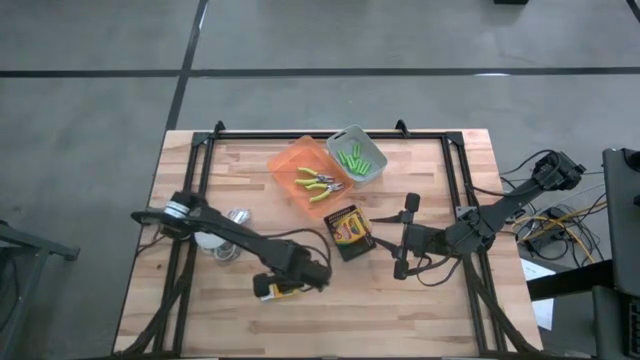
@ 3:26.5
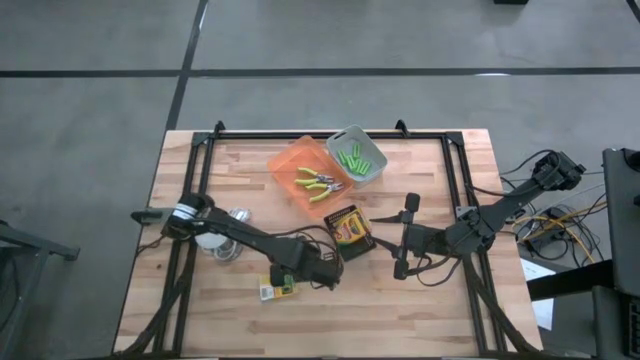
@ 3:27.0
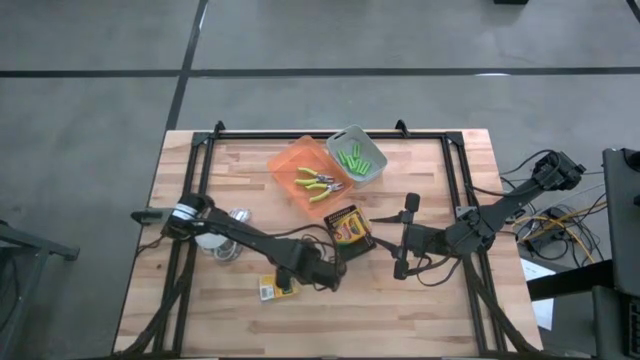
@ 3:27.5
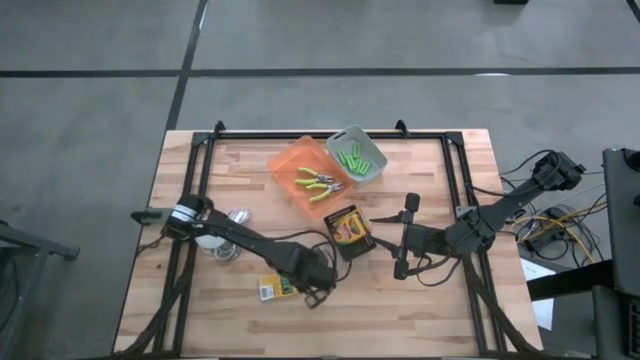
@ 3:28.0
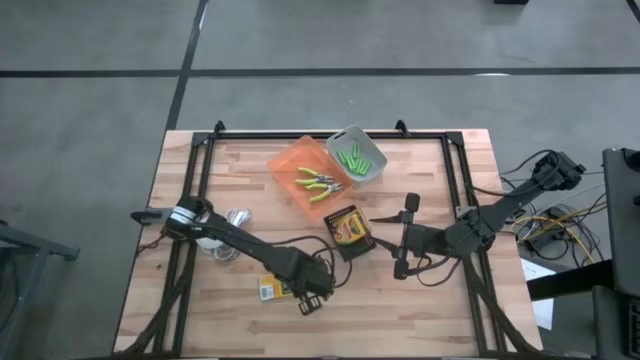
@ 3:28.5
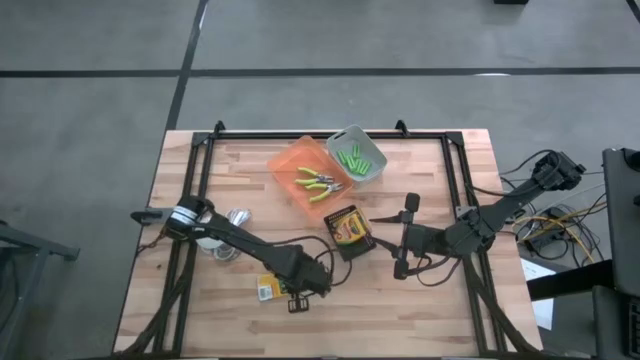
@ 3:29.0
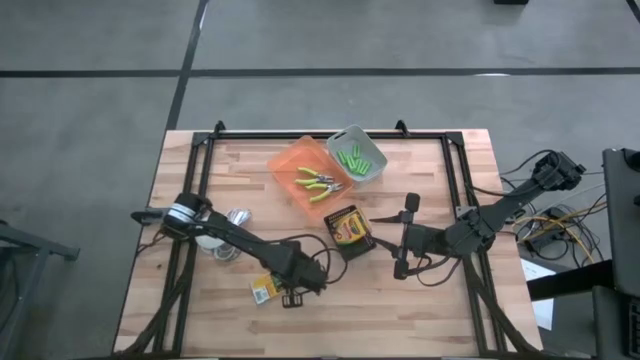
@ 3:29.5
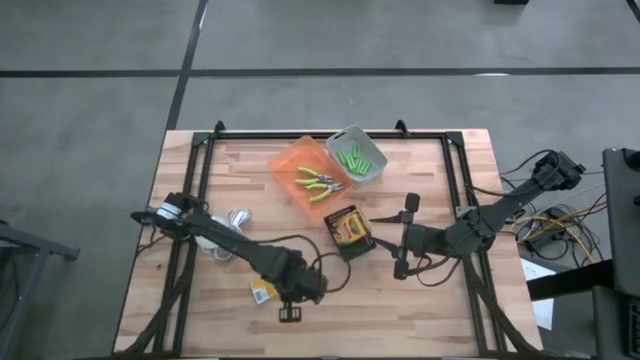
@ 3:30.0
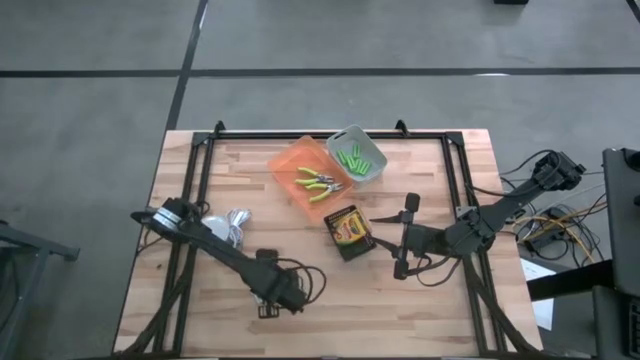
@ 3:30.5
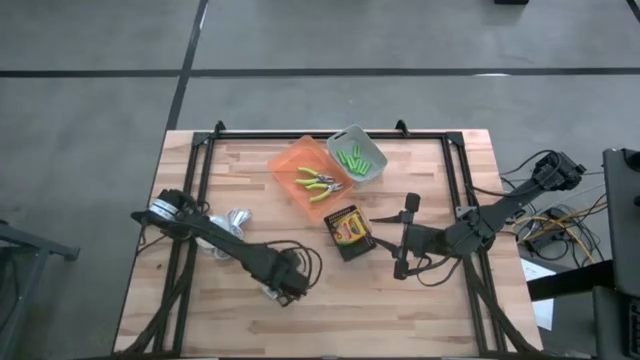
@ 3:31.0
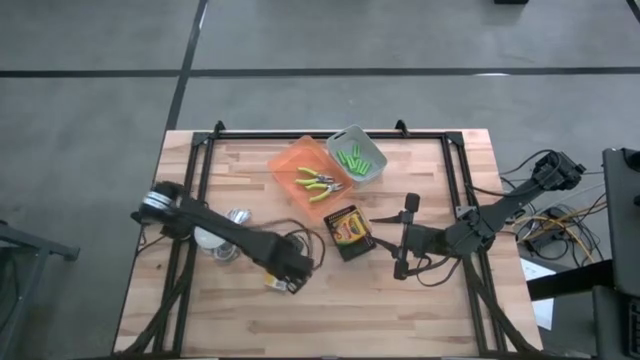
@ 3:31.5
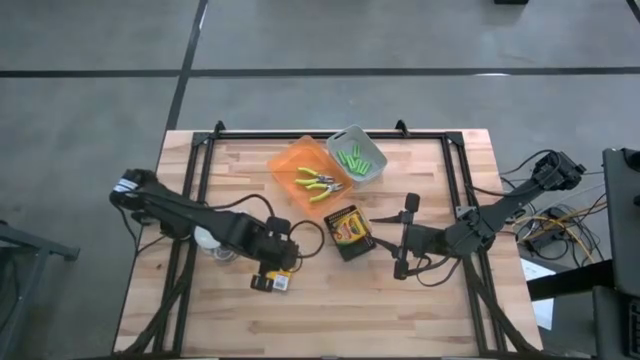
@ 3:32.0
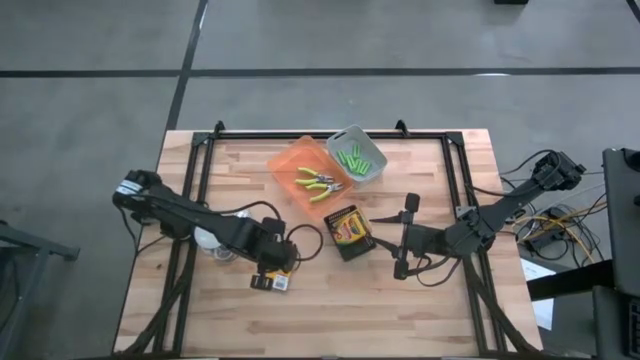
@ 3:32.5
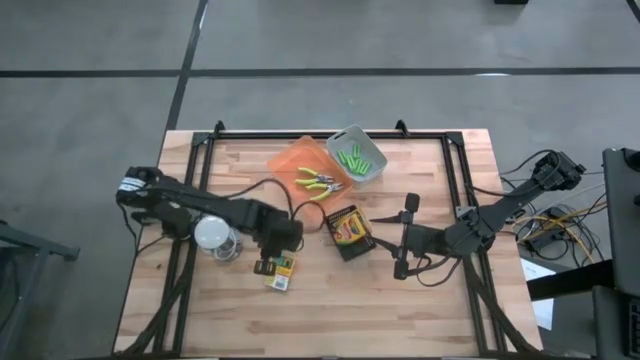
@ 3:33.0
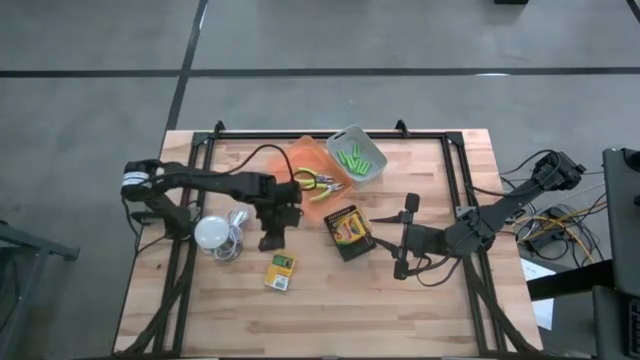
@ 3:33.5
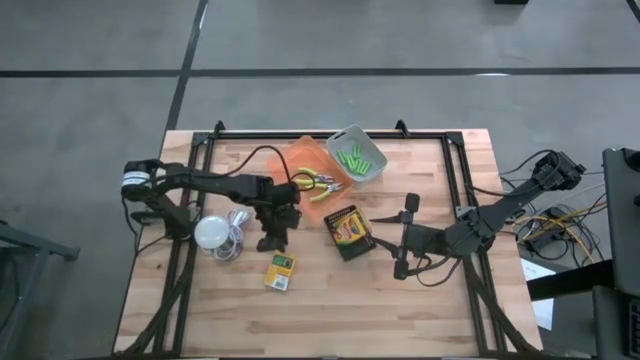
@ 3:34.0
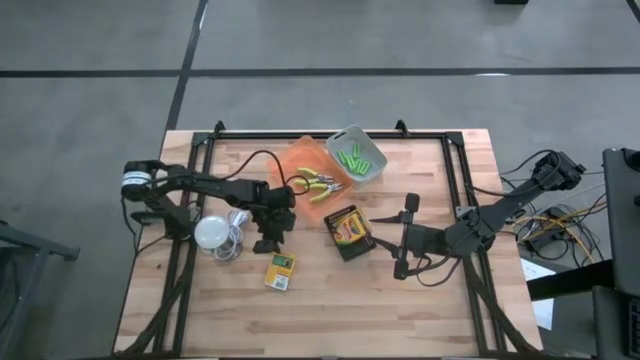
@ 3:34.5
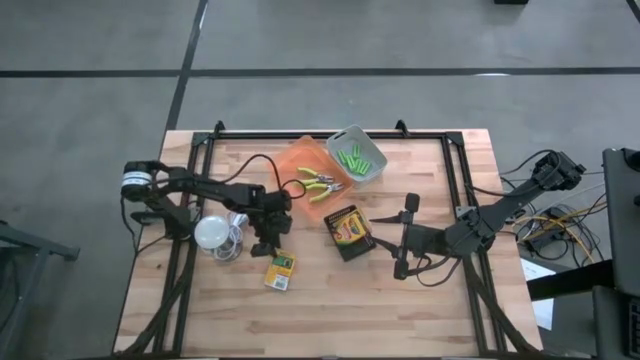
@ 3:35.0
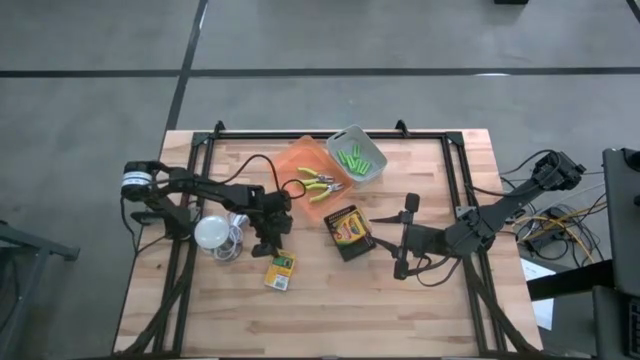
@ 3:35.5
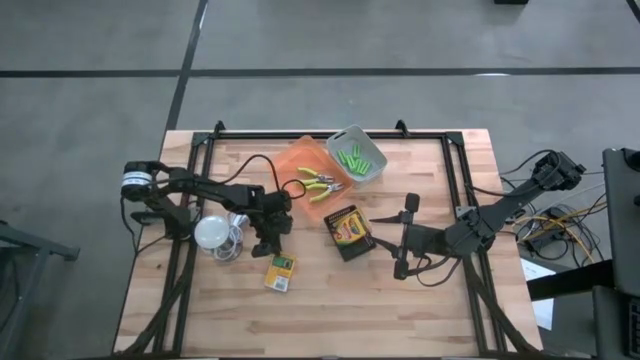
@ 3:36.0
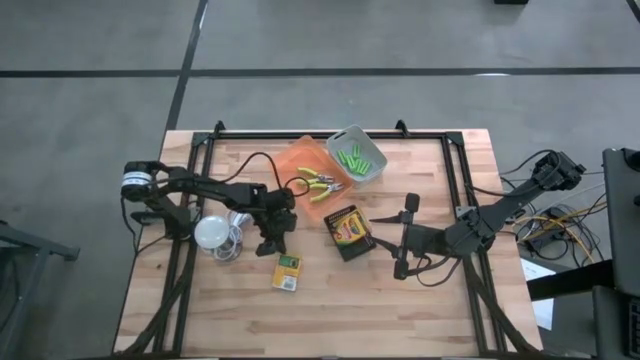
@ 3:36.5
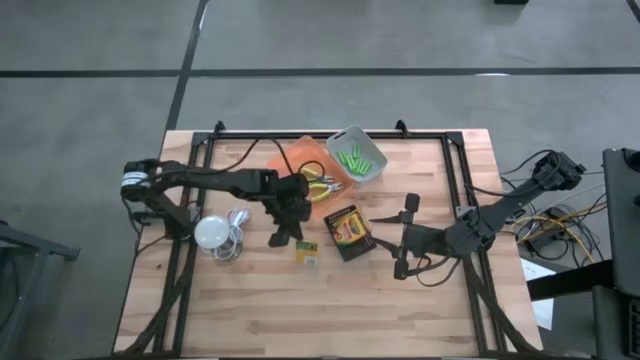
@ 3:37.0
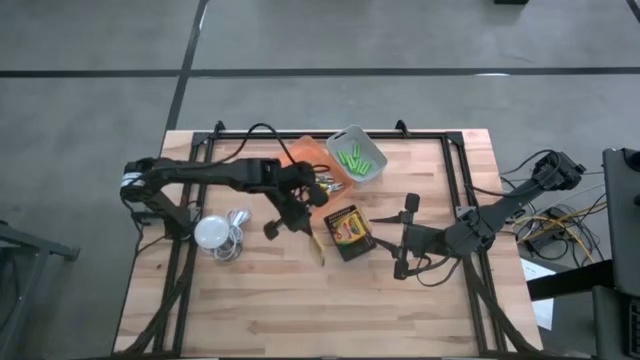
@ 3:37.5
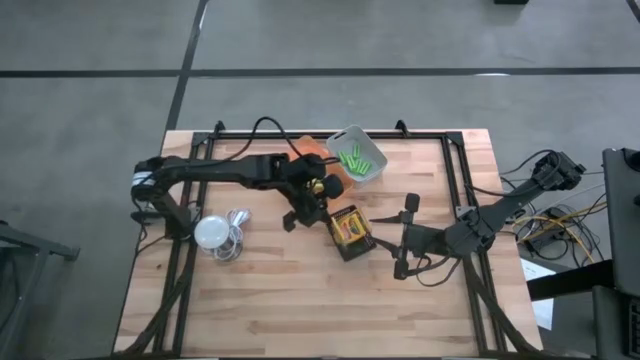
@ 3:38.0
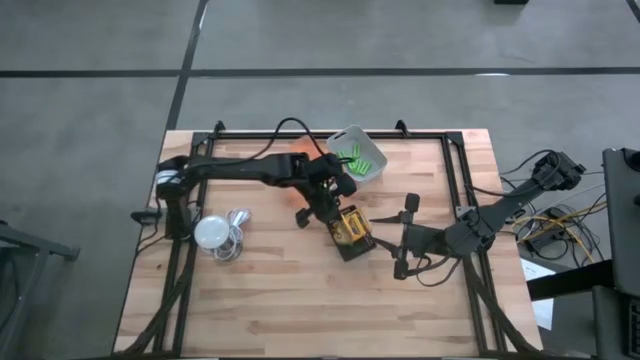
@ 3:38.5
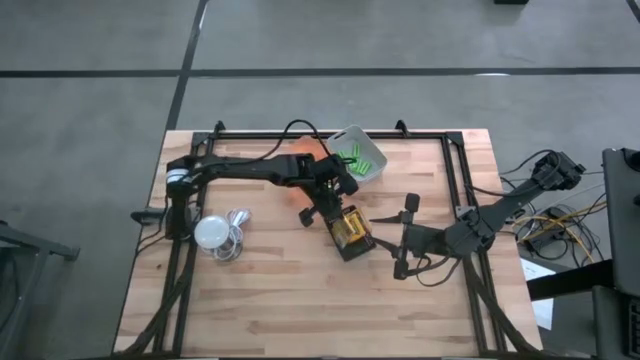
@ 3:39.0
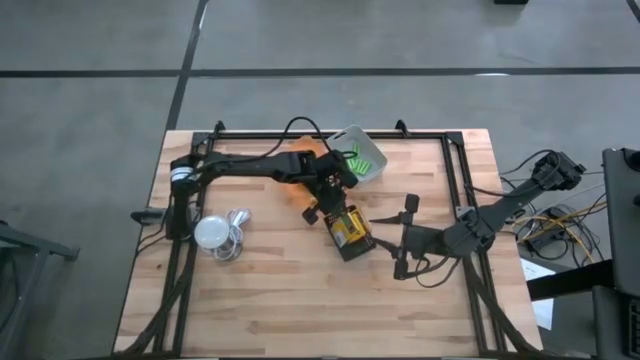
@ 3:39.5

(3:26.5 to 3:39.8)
Task: Pick & Place School Supplies
Put the yellow crayon box into the black bin

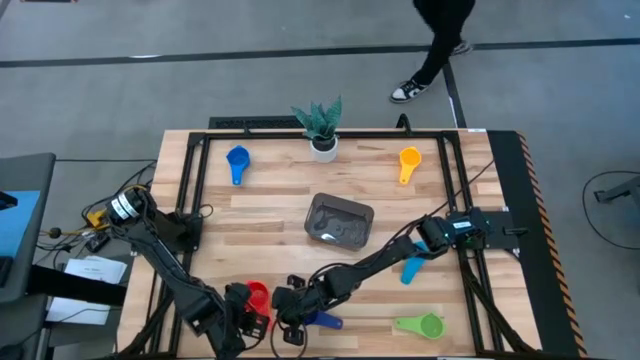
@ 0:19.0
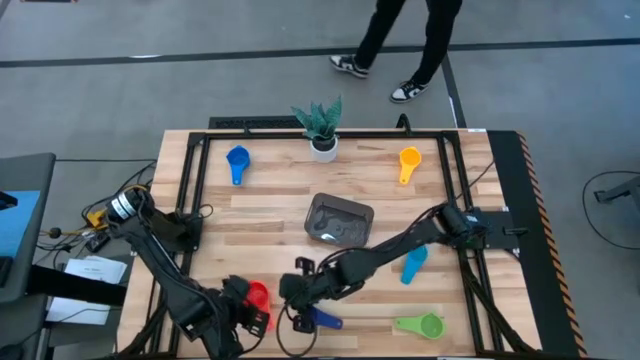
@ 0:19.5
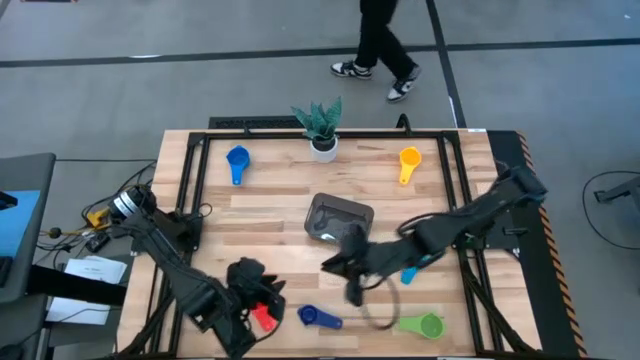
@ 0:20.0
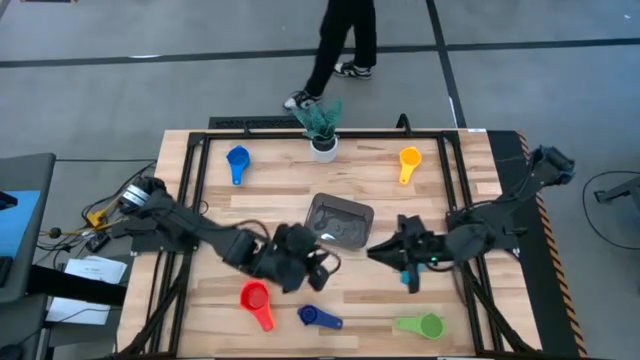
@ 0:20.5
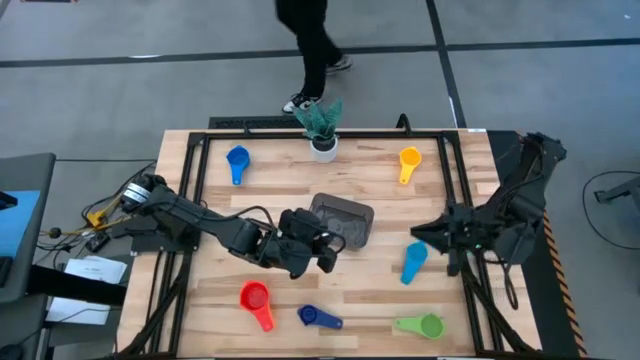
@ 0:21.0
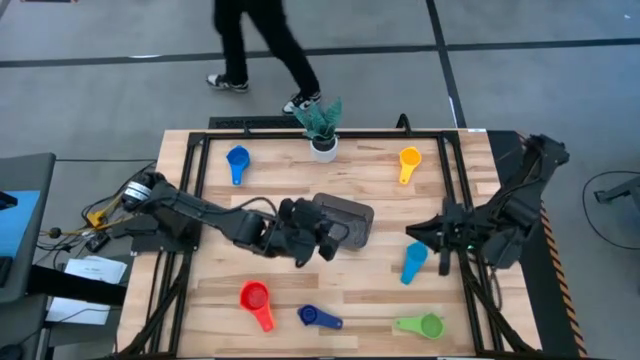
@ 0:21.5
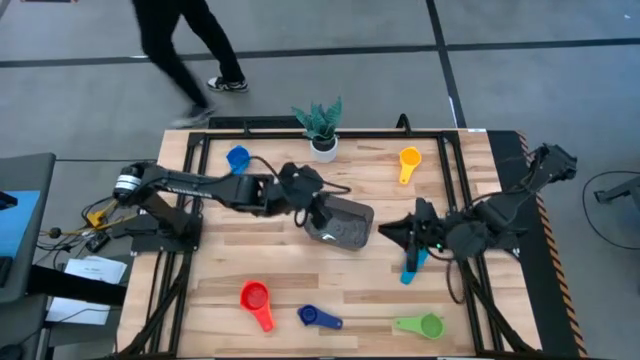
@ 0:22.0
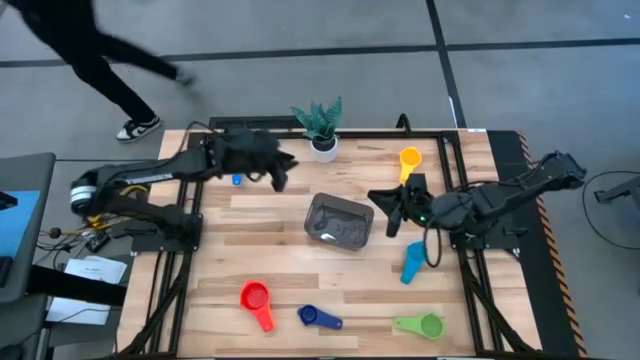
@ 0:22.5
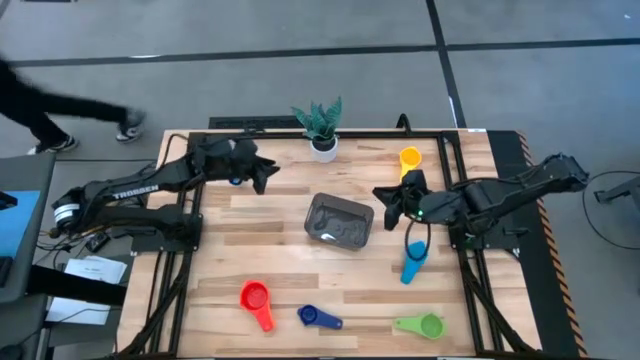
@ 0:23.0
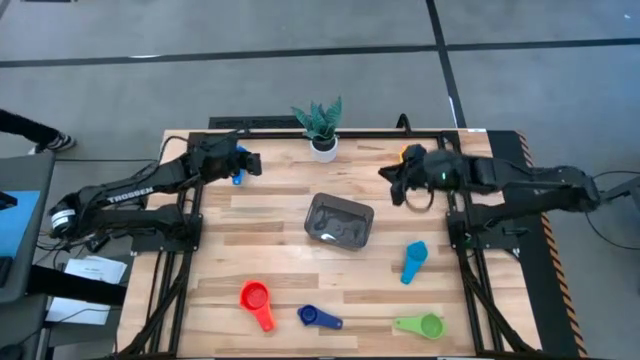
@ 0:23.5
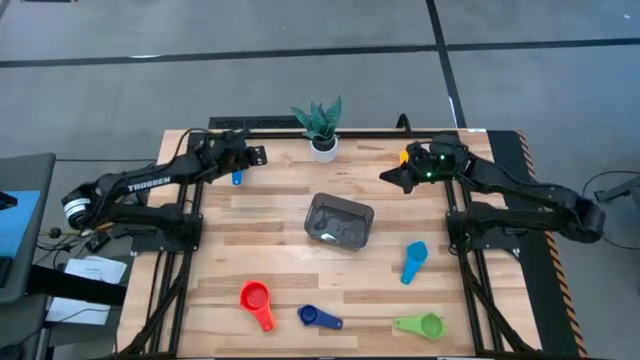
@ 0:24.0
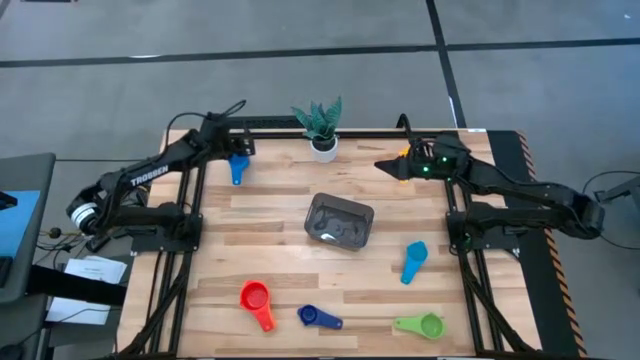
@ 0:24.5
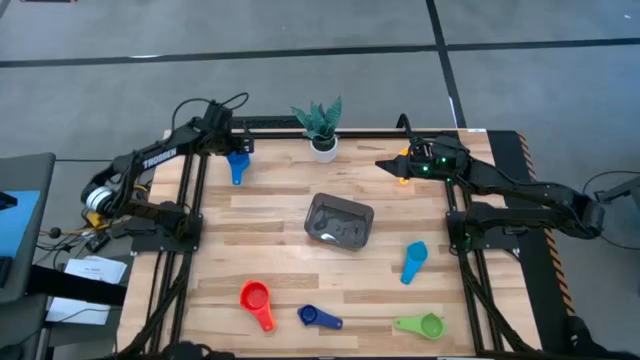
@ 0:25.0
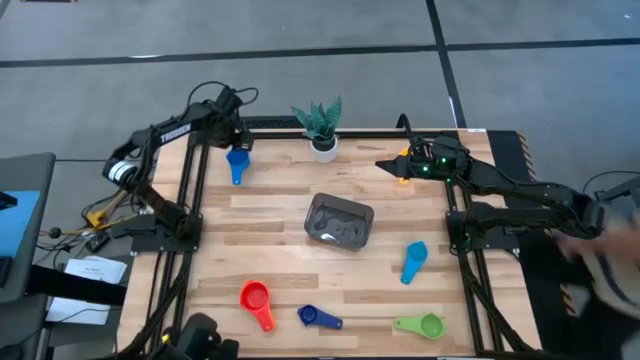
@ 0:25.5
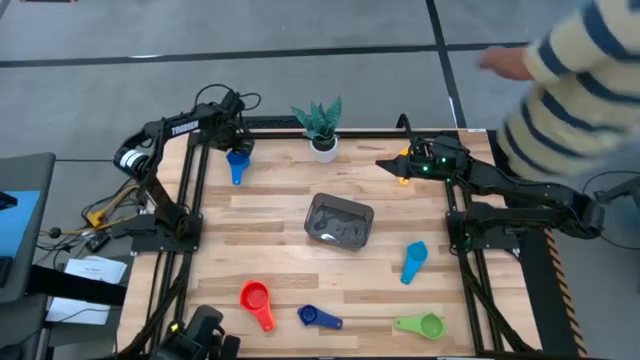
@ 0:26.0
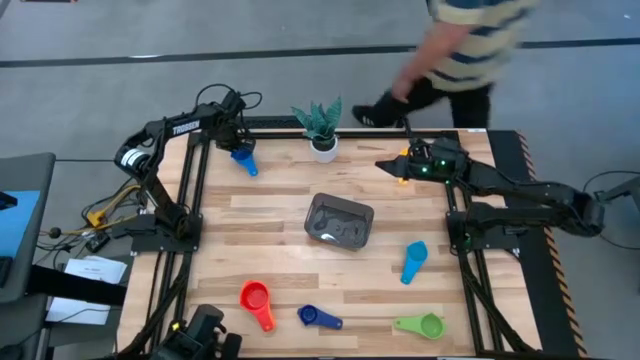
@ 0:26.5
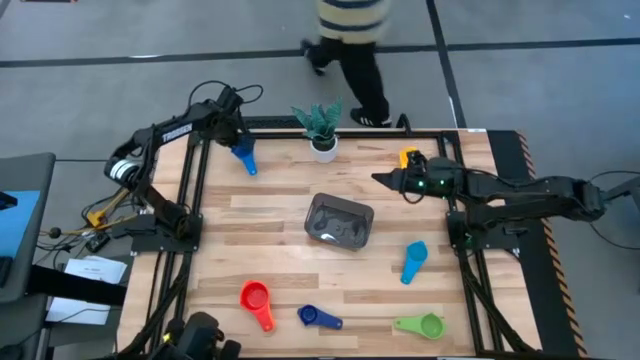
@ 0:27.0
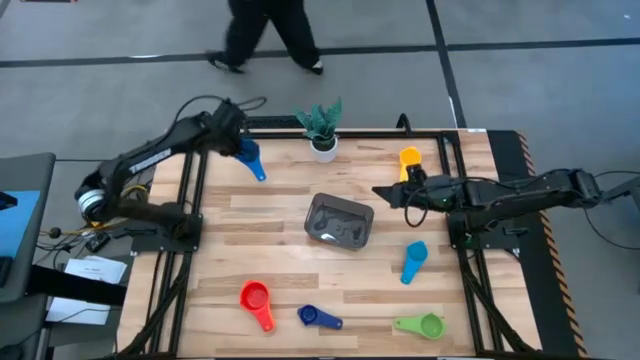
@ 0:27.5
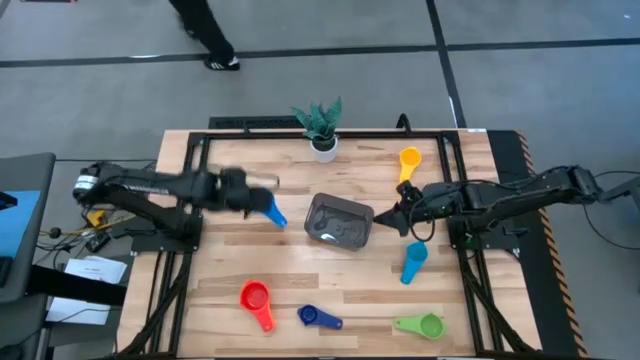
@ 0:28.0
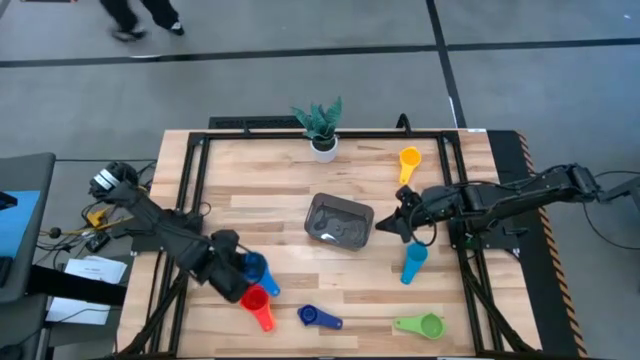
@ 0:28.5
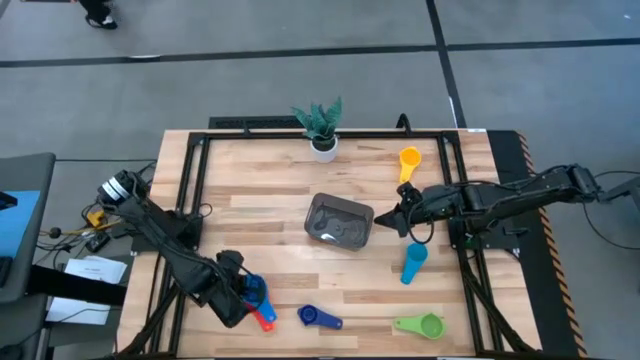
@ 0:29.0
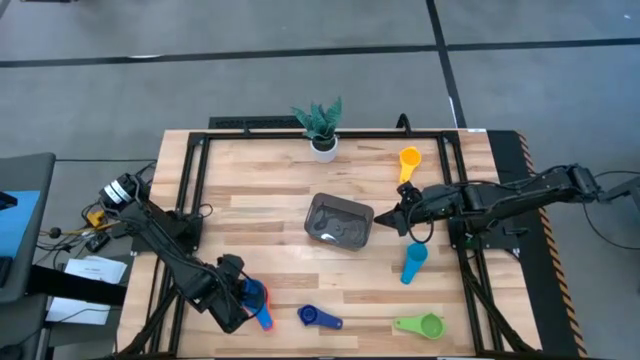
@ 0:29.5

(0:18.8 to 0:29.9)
Task: Nest measuring cups in basket
Stack the blue measuring cup on top of the orange measuring cup
